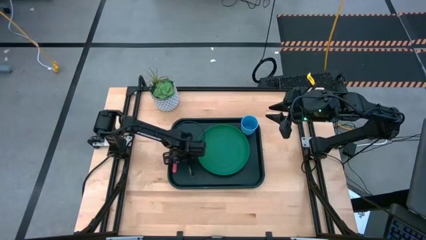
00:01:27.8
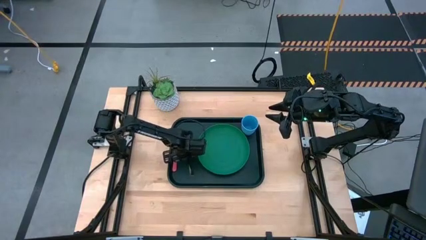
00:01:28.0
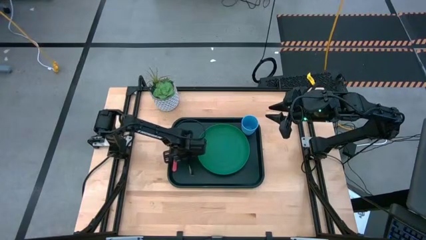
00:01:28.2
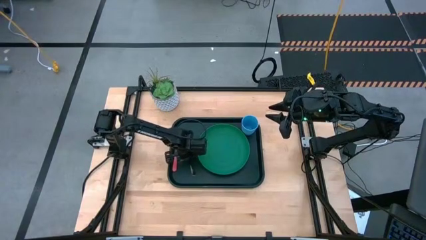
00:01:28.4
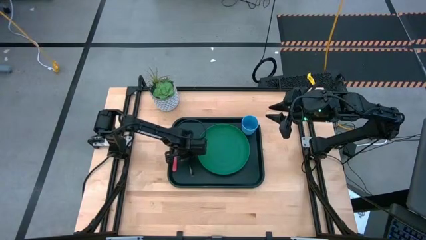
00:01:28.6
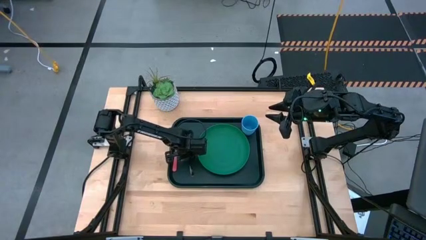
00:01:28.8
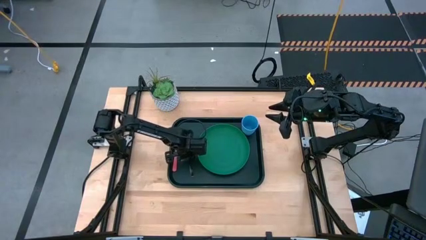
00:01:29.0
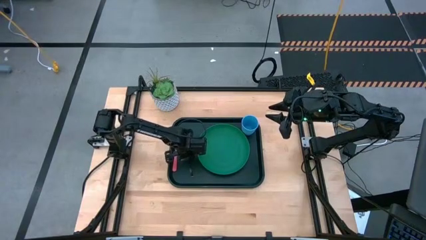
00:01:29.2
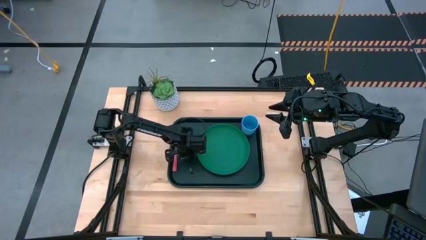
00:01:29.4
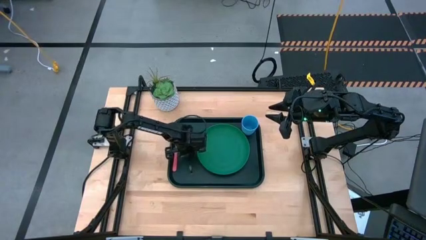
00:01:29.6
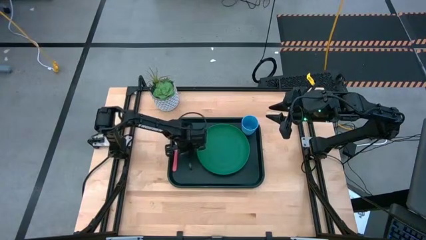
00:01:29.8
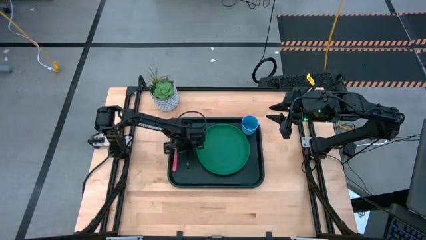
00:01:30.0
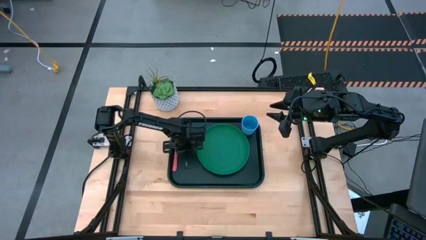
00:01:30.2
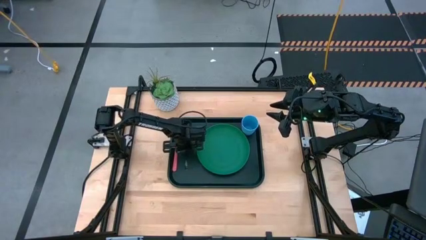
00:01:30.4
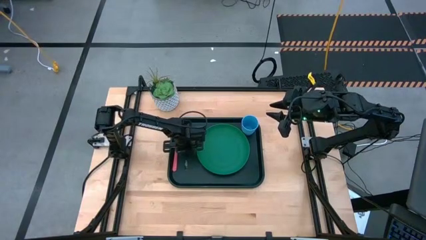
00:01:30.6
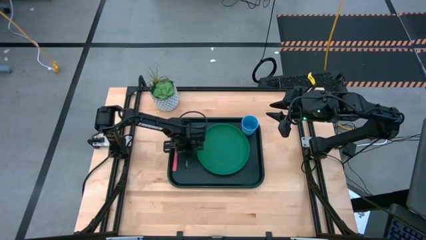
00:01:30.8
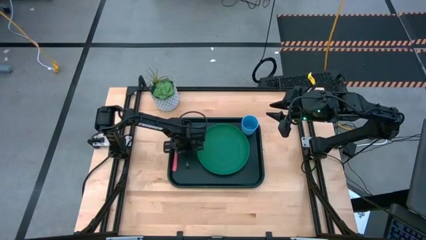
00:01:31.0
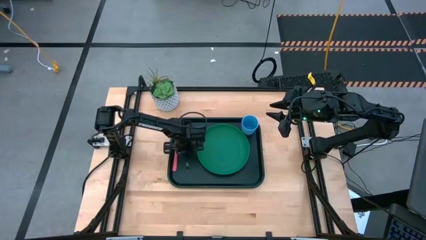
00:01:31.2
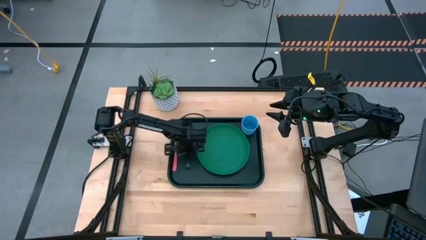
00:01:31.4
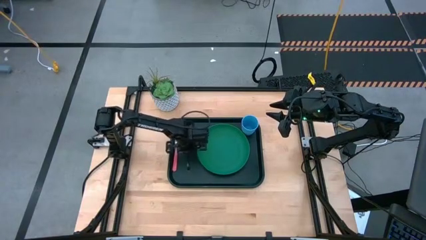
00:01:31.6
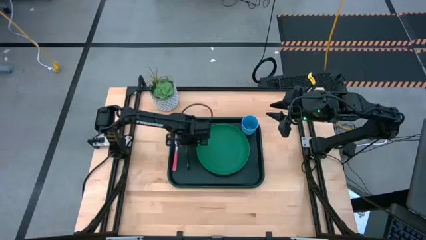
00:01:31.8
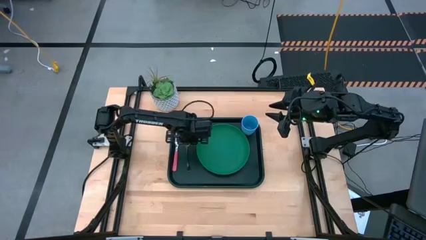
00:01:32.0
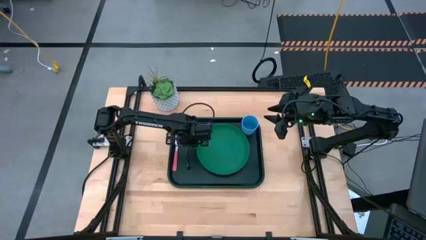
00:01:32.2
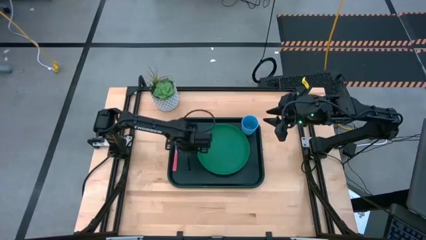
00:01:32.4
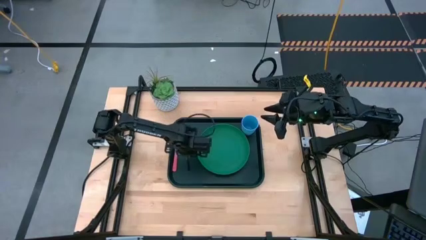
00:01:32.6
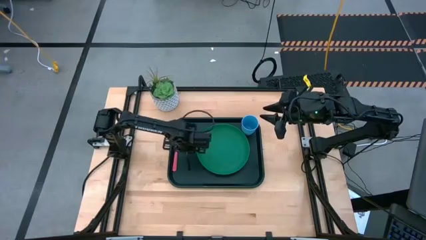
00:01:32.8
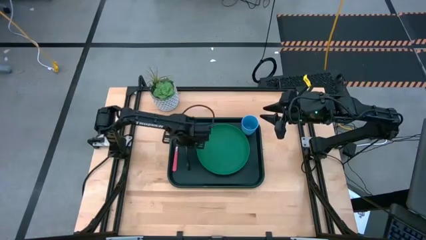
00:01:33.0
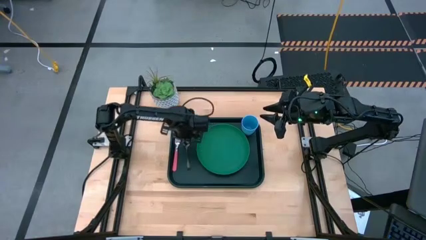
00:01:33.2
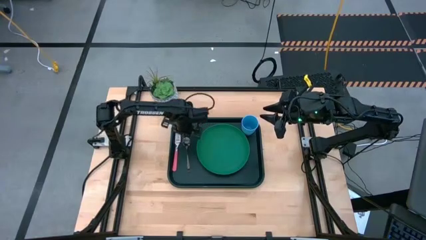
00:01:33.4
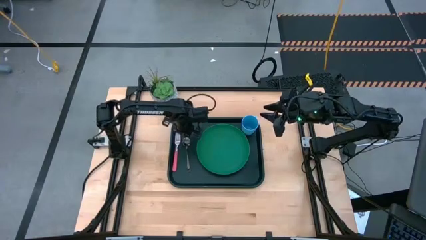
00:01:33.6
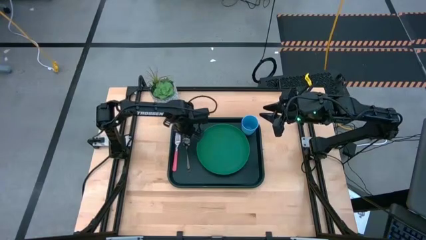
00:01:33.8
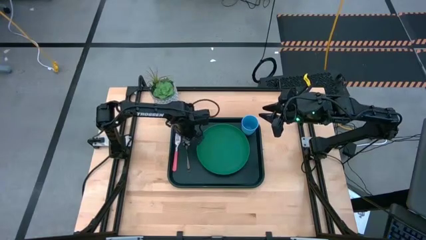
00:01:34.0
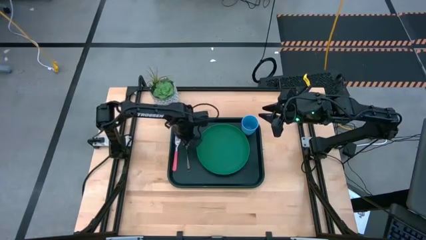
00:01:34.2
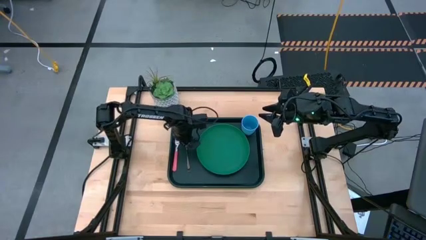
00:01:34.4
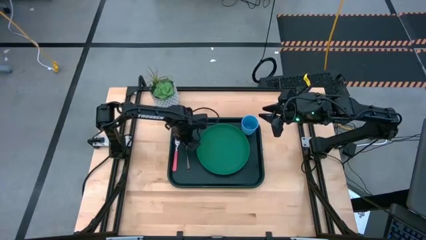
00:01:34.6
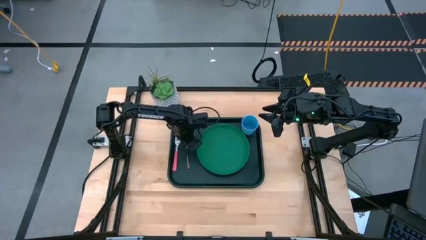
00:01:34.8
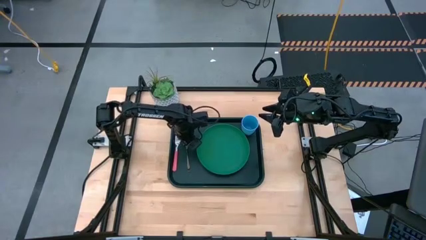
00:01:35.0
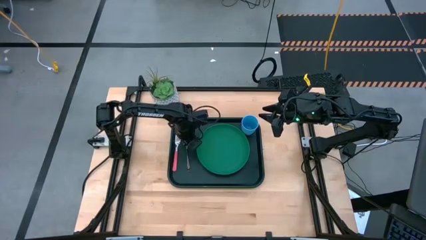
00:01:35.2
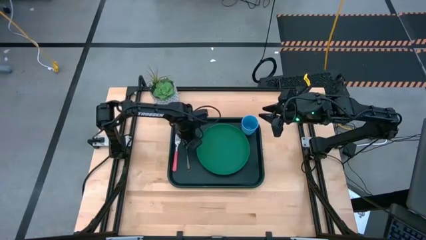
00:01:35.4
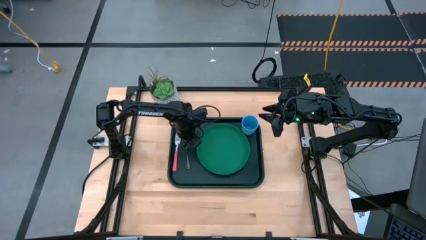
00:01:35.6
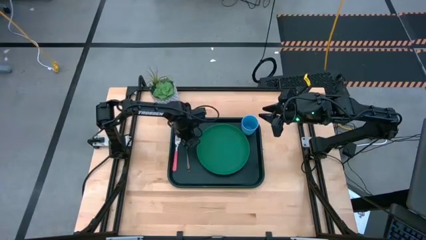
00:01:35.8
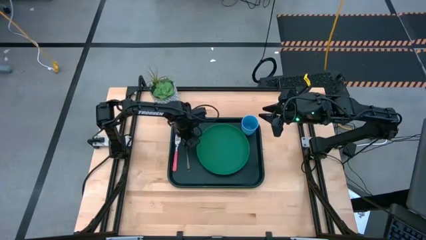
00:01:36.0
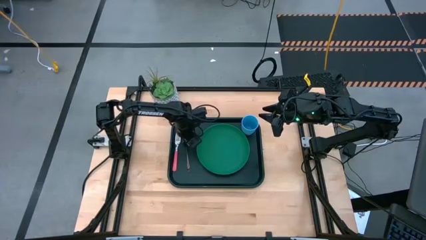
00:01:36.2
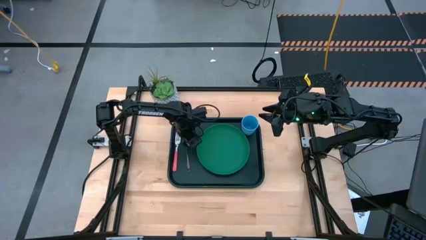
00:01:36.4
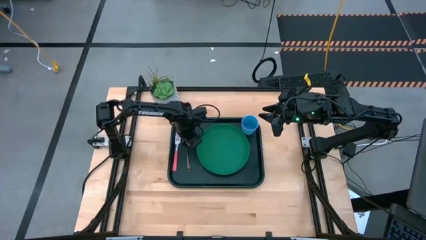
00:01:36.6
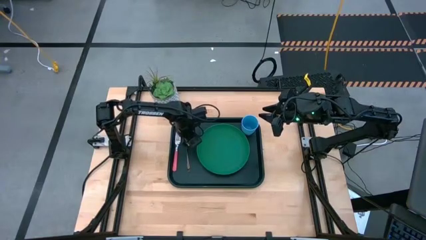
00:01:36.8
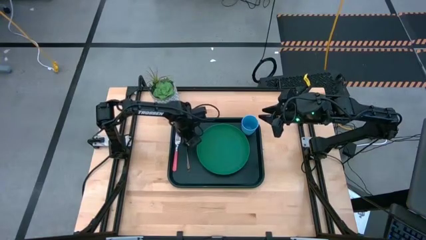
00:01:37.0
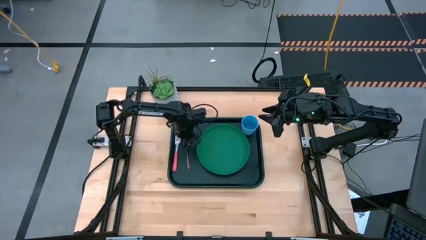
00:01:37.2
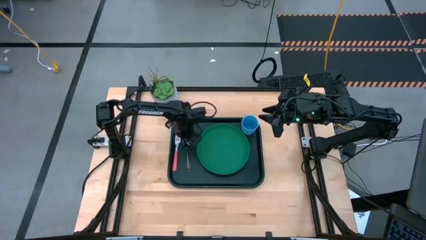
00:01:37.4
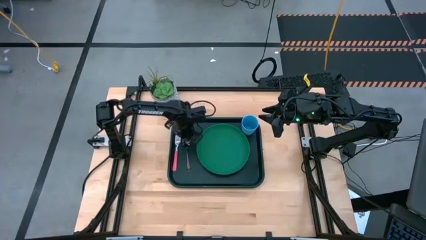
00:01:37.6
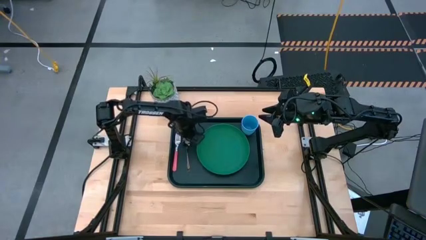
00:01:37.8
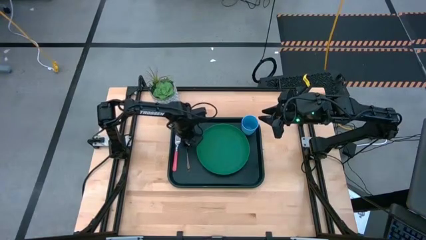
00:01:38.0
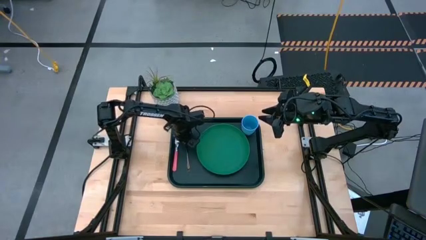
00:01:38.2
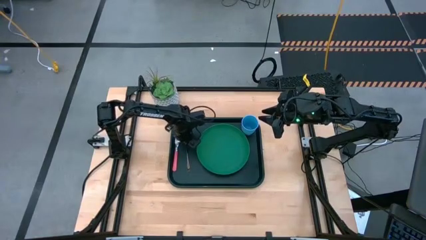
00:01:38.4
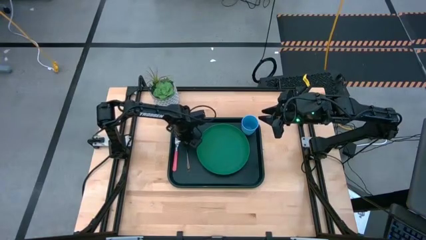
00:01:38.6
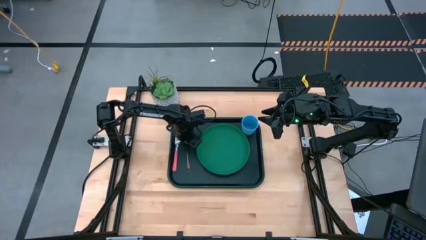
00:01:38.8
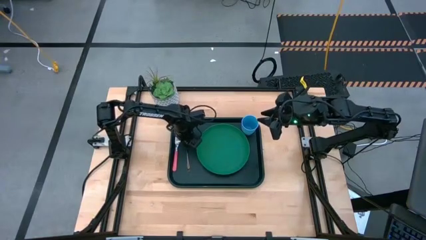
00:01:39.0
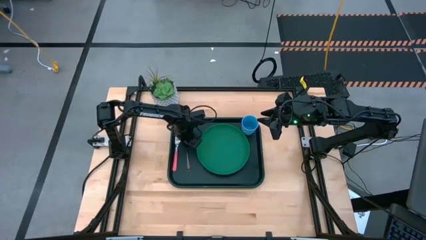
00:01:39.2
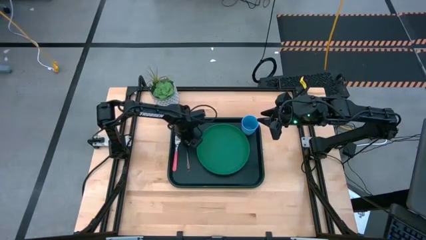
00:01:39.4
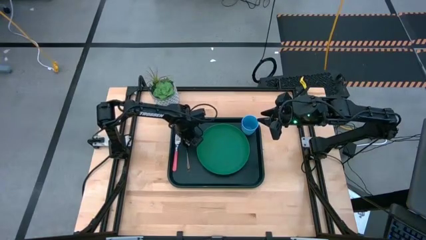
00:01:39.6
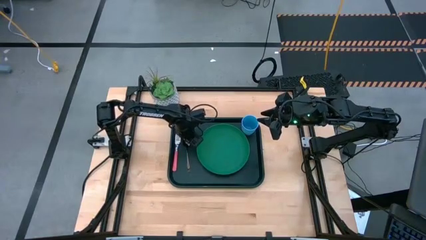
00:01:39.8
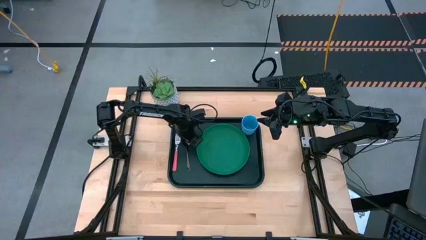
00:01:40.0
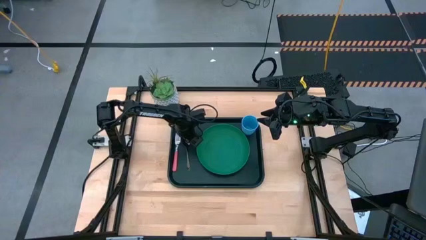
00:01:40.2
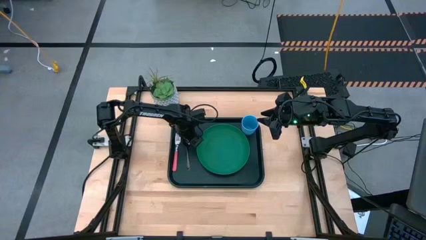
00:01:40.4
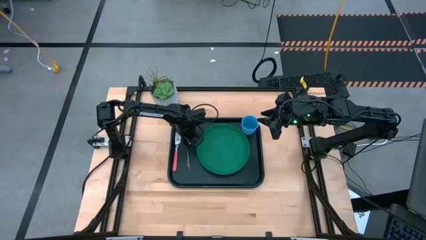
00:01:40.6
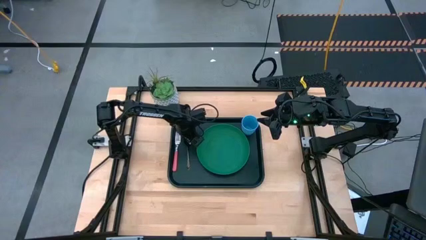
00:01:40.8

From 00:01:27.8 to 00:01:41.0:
Task: Pick and place plate/cup/fork/spoon on tray
Put the black spoon on the dark green serving tray to the right of the pink fork
